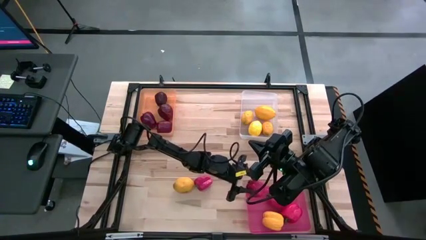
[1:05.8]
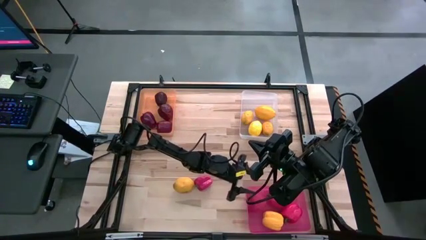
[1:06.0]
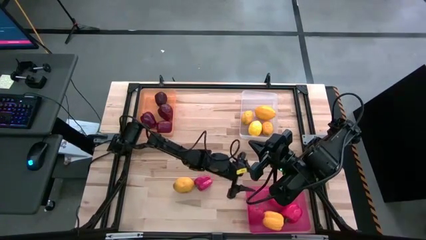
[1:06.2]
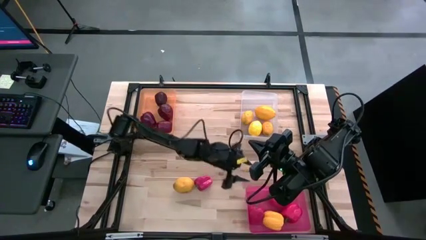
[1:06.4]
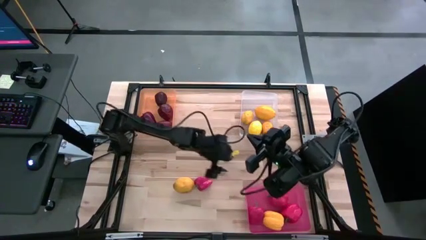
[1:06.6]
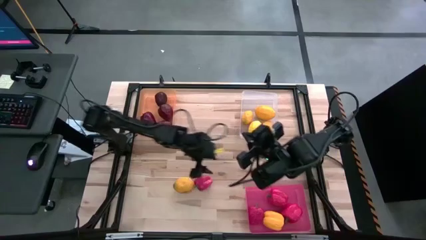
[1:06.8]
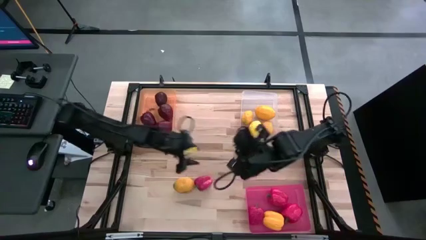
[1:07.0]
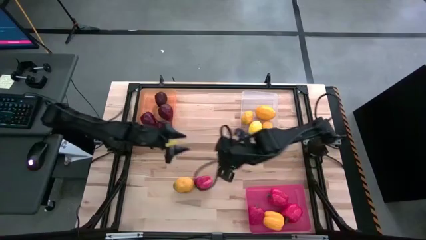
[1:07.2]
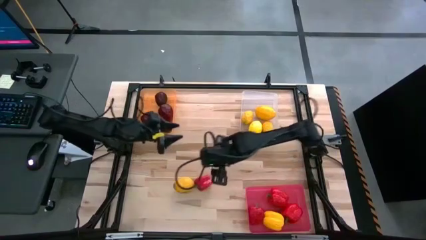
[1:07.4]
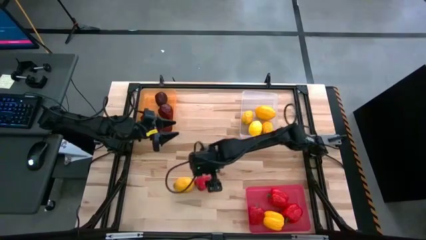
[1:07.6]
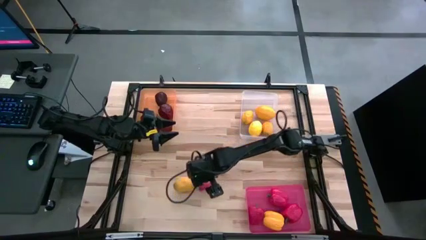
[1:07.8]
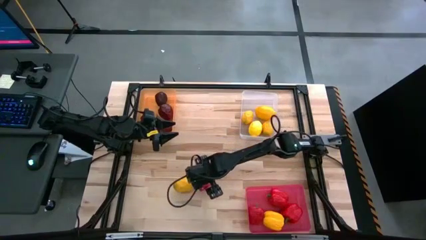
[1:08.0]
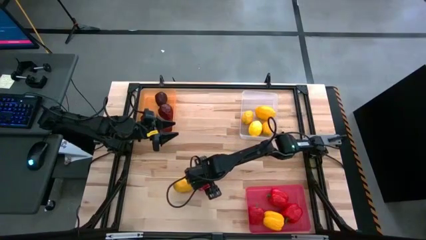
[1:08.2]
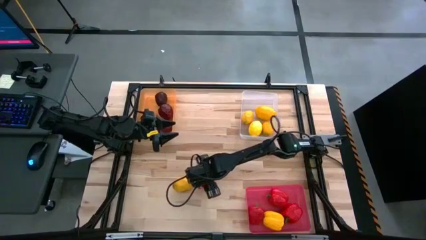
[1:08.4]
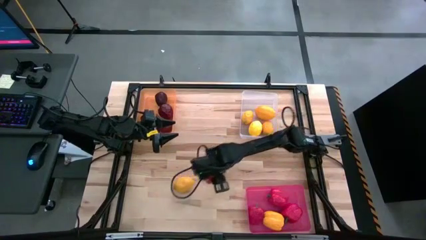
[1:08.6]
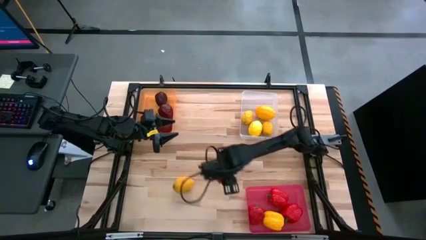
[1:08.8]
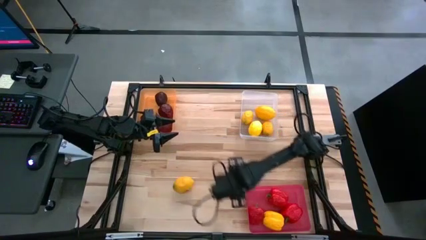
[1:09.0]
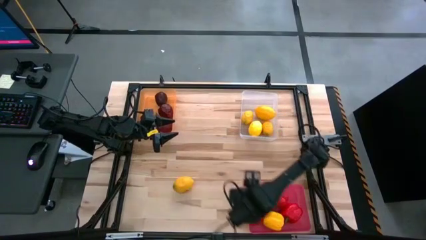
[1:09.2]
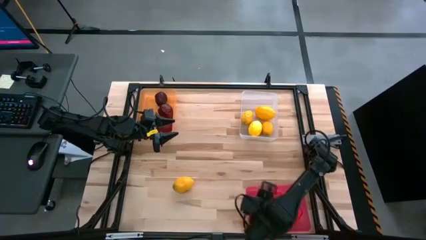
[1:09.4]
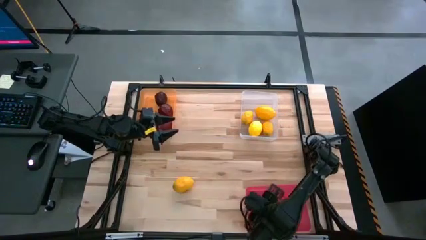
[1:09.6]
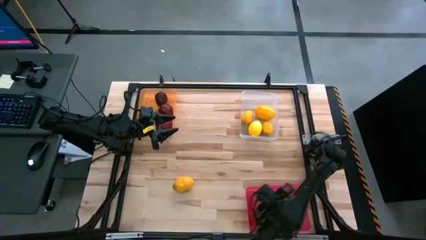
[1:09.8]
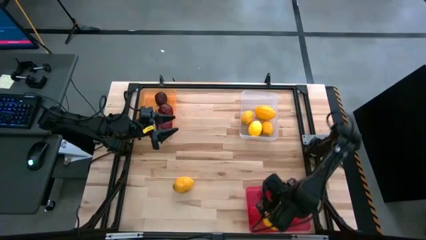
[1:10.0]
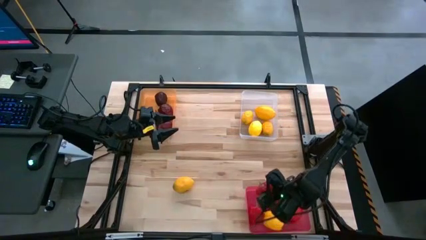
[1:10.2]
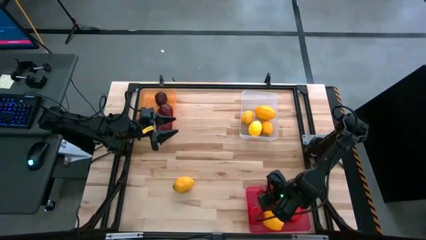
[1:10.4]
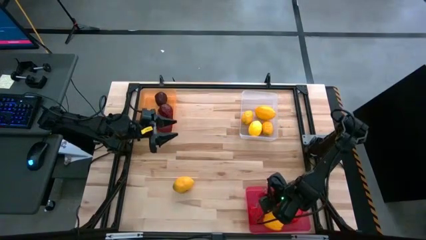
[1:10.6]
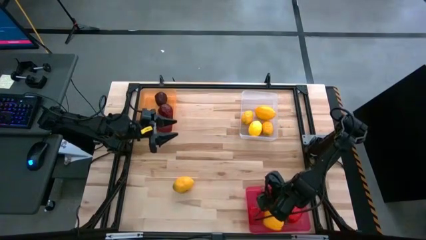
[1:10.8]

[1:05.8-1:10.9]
Task: Sort produce into baskets
Put the red bell pepper into the red bin

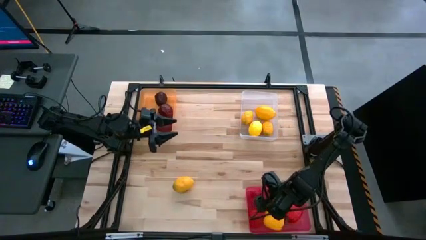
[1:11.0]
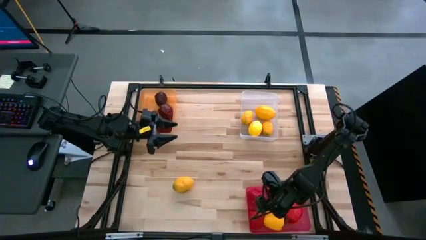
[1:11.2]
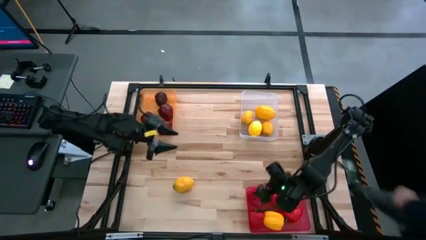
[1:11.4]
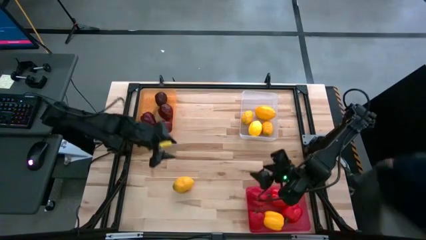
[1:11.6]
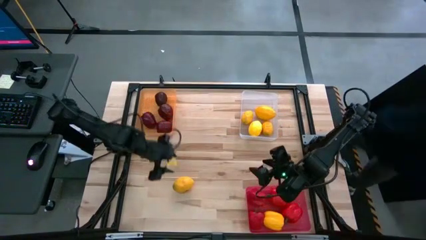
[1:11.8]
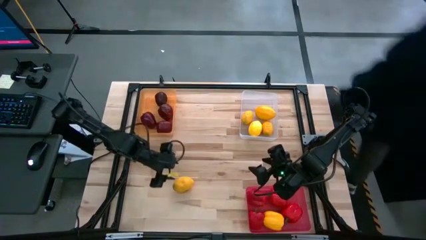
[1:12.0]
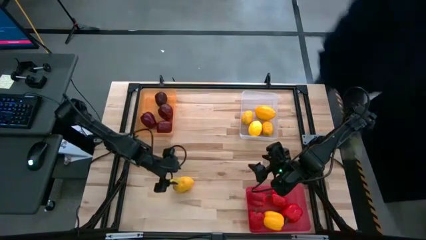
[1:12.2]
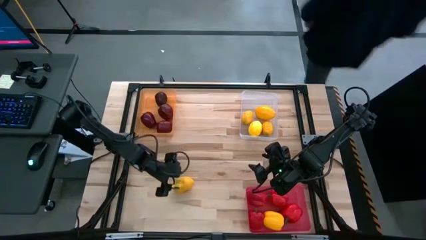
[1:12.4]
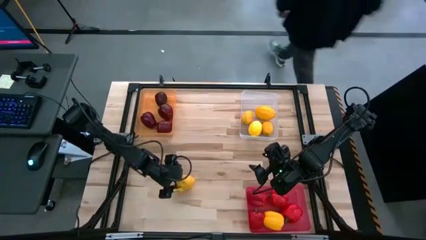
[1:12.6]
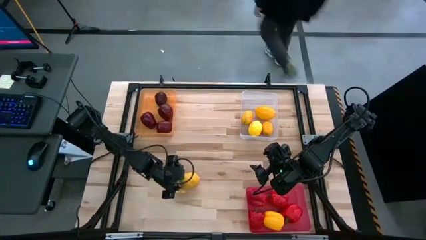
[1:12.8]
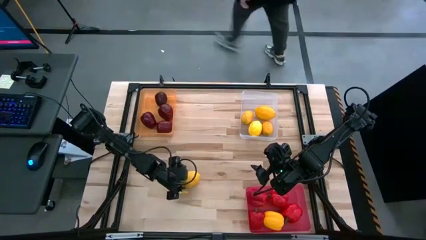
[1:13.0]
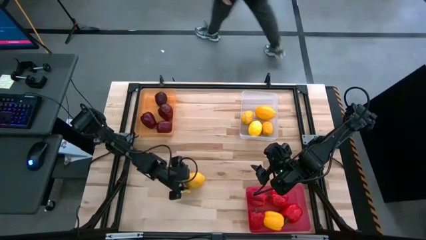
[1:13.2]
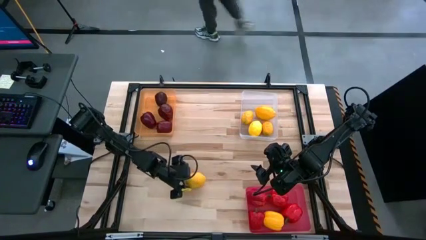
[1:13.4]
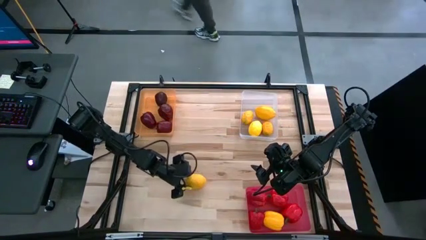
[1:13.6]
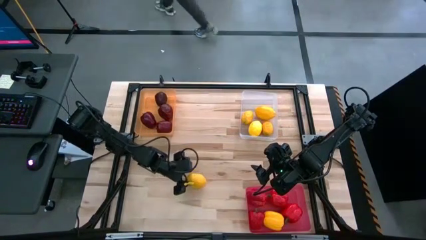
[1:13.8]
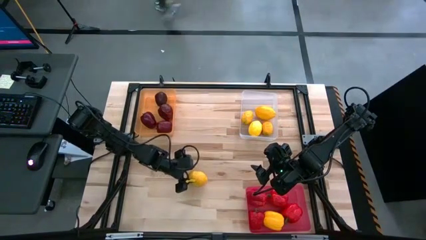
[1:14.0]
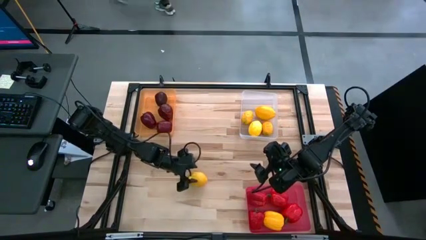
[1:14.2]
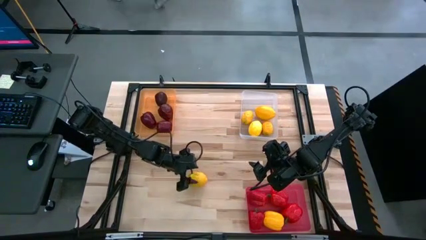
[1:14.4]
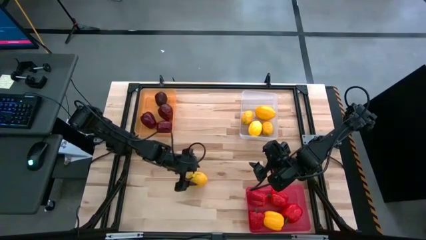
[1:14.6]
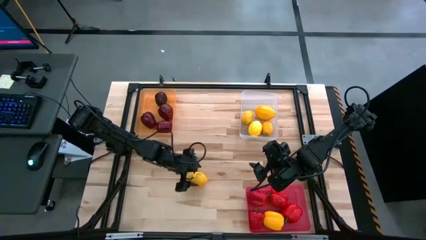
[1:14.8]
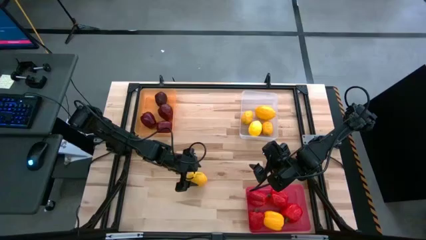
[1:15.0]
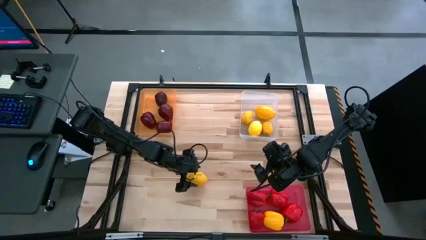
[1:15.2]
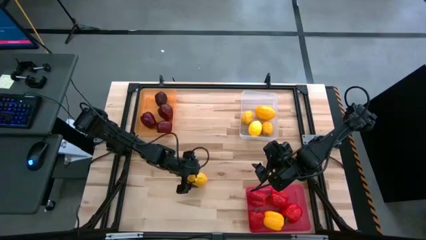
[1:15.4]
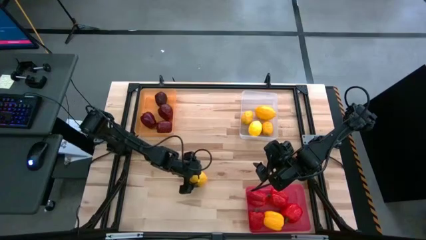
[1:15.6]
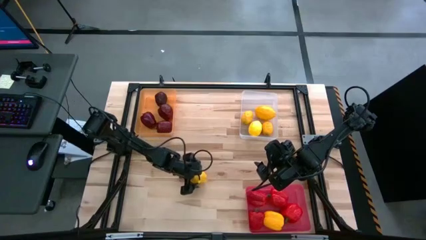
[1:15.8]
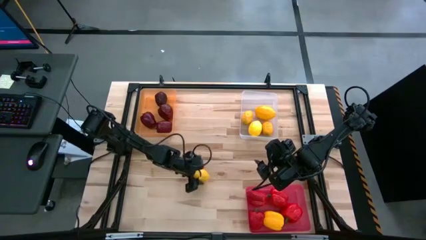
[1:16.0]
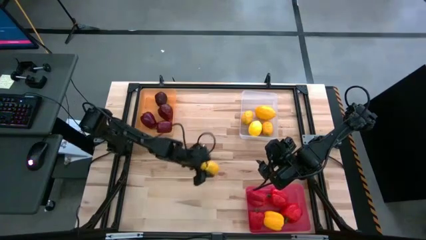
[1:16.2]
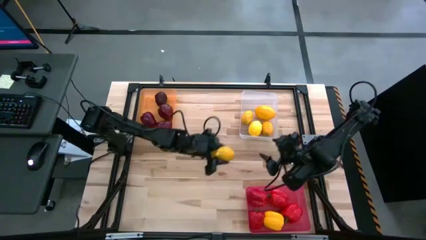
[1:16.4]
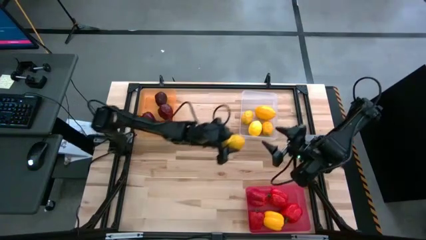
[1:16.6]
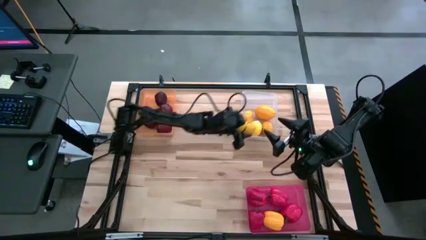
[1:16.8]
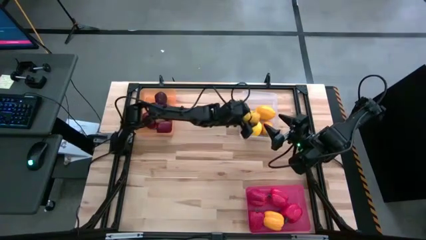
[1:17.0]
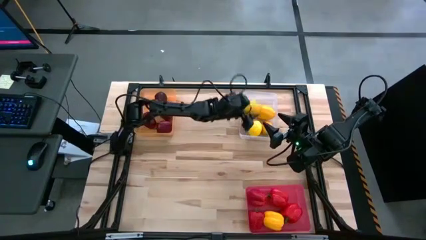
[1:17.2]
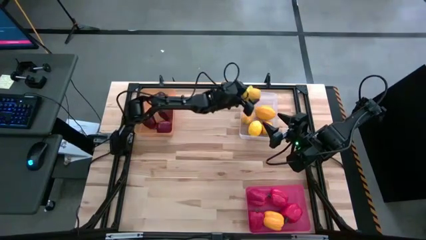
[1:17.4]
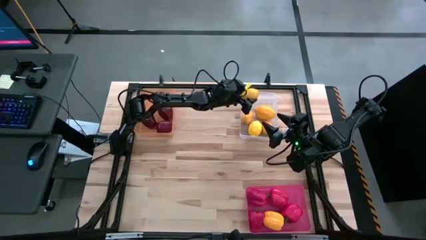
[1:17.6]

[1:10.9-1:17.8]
Put the lemon into the white bin

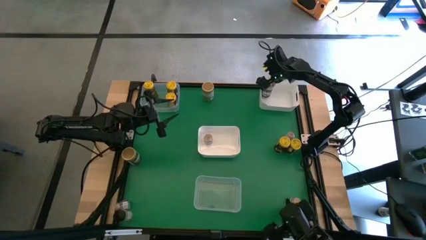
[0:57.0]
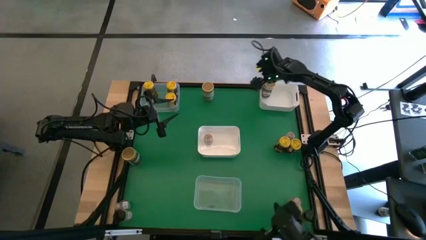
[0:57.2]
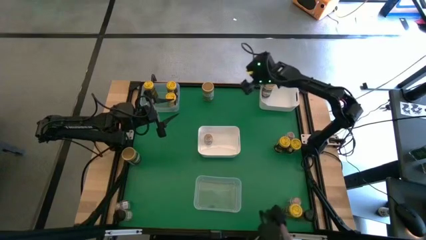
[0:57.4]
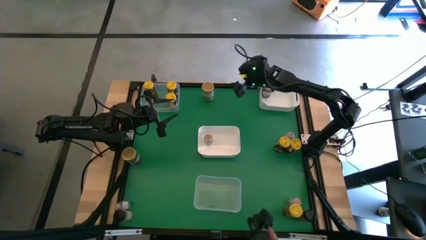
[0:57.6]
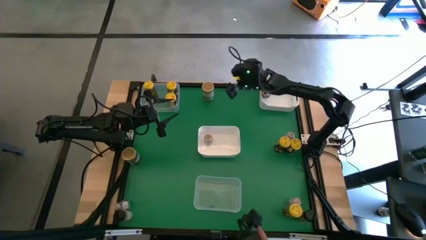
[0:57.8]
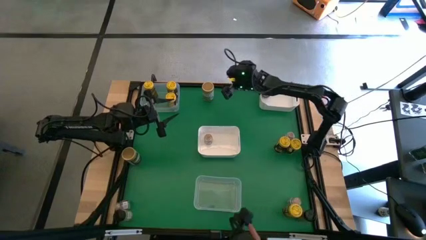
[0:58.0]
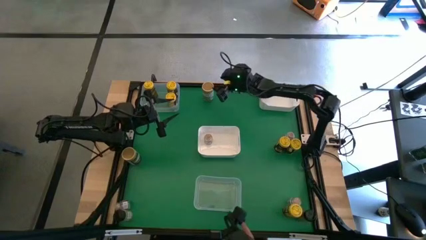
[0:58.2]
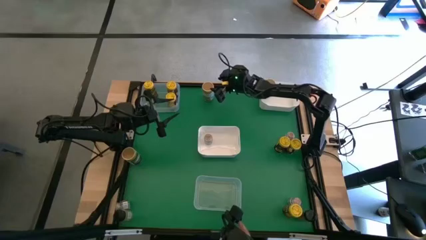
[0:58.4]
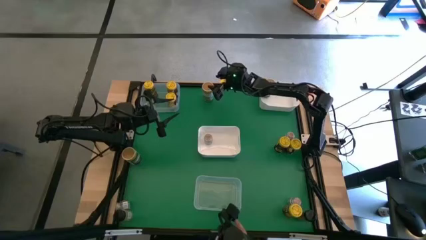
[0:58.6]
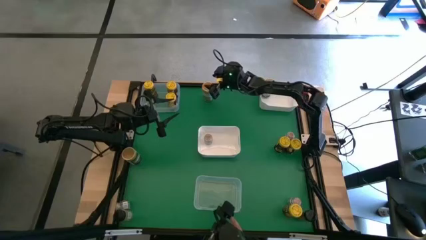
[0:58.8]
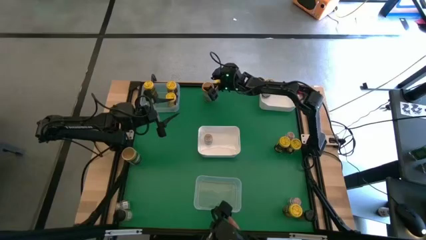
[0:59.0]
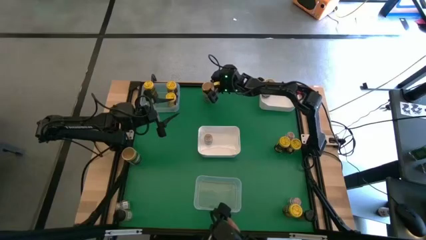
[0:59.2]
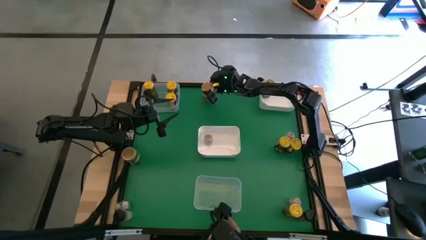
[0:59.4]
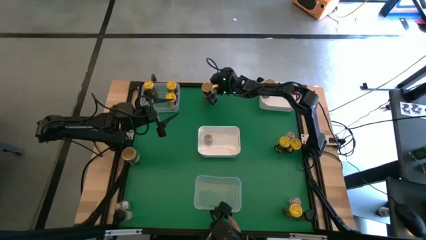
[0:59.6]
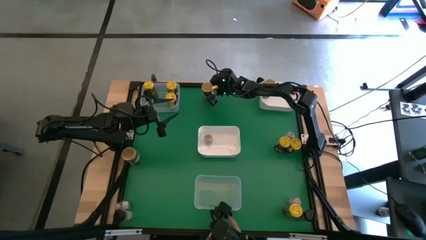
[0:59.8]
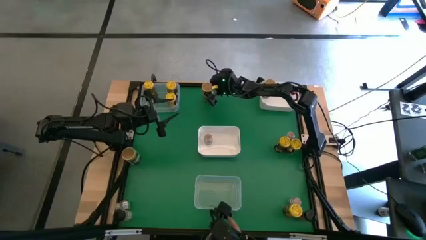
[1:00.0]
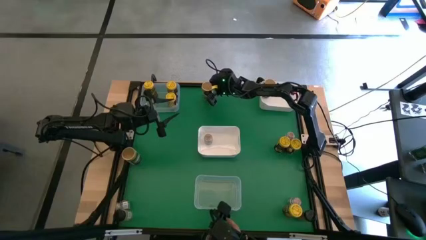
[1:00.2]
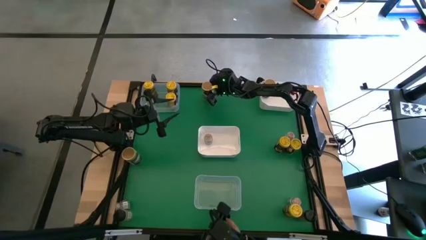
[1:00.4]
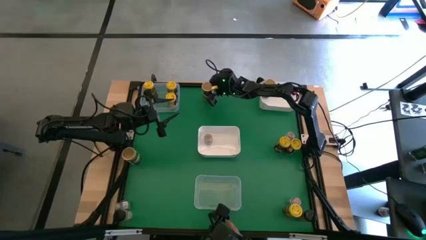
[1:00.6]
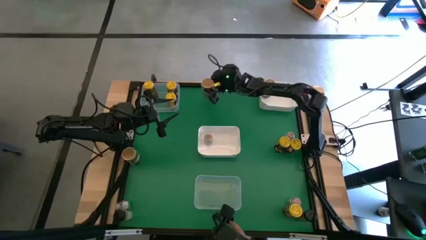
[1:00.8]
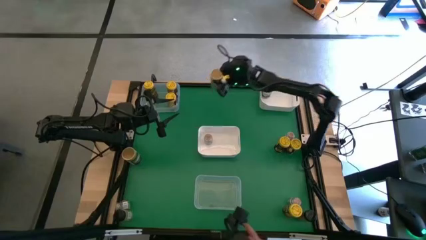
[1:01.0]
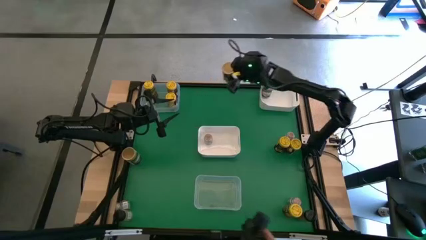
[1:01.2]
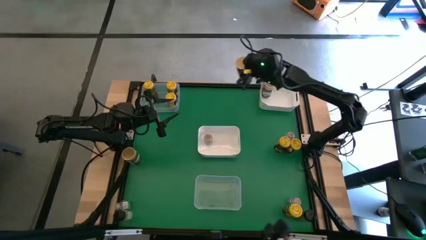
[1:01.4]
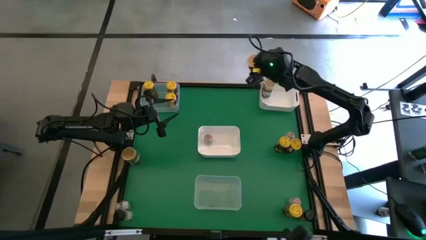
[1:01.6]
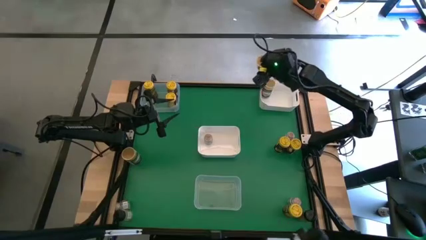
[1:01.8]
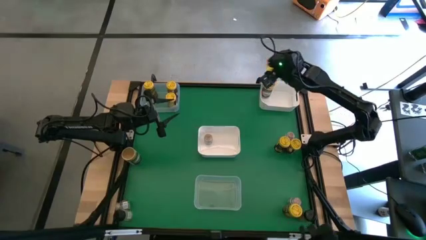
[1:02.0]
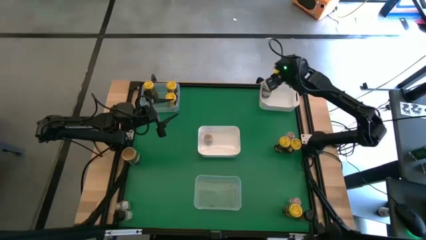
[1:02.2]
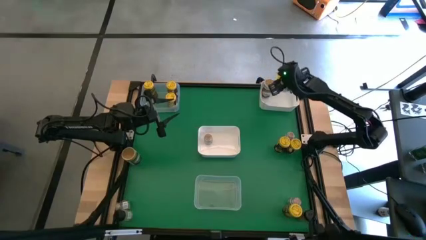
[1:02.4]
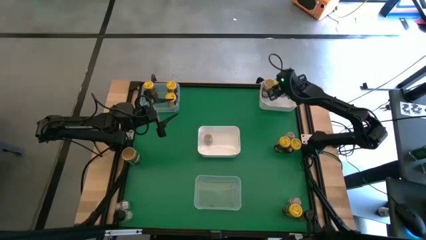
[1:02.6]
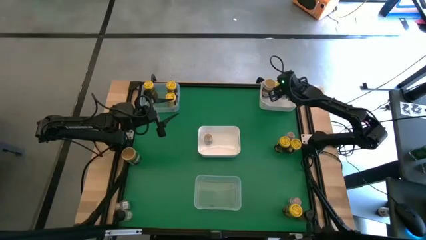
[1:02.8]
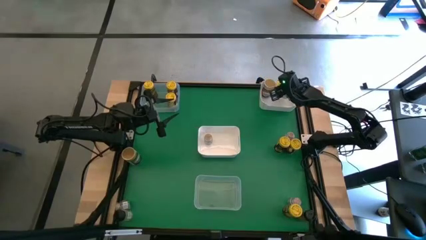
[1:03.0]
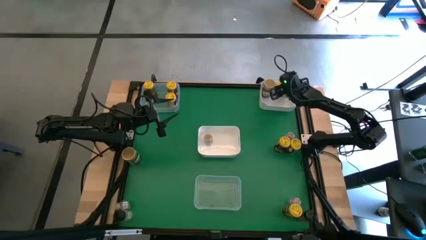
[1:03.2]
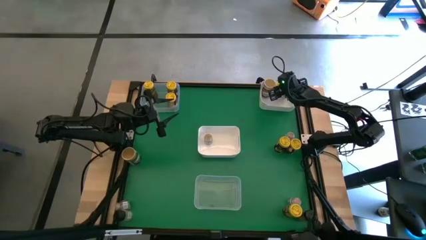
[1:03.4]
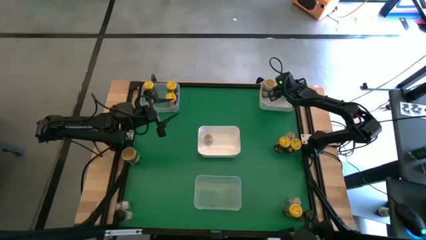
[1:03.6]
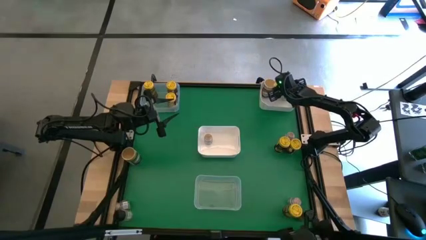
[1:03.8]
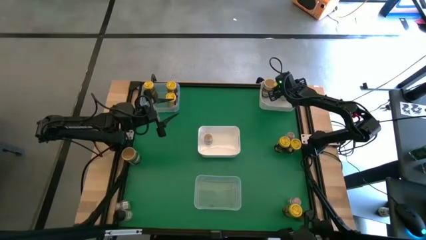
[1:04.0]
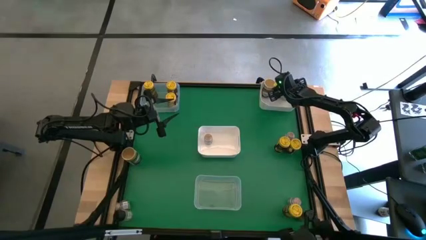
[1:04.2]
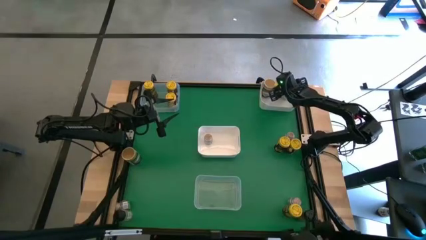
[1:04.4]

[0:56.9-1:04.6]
Task: Sort spices by type
Put the top gold seasoning bottle into the top white bin
